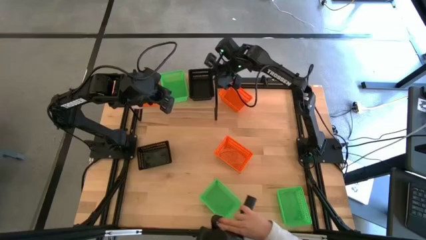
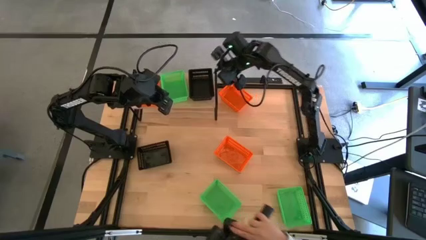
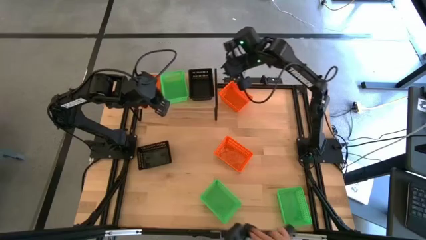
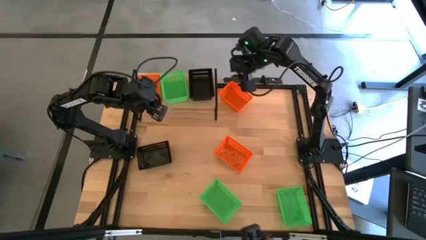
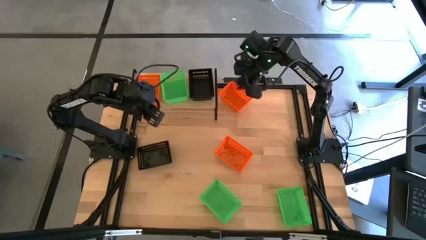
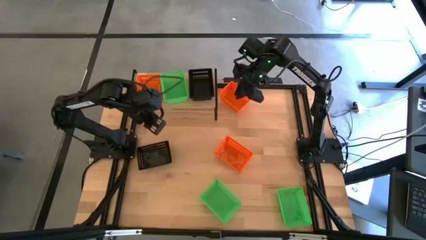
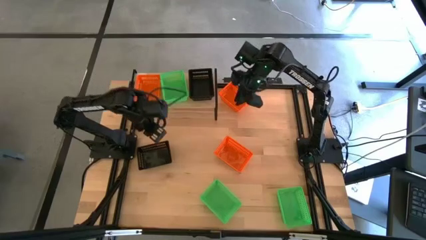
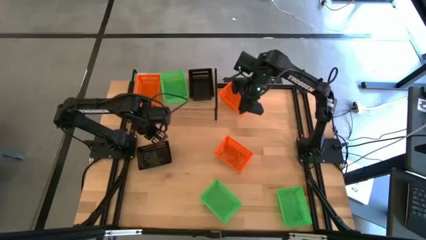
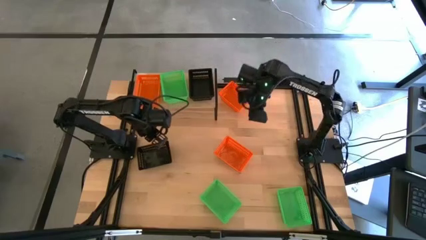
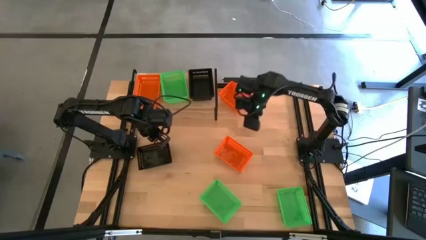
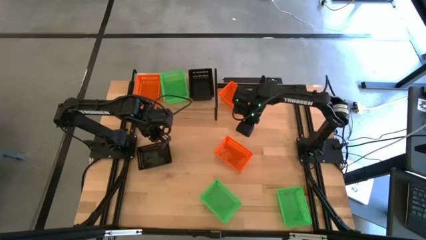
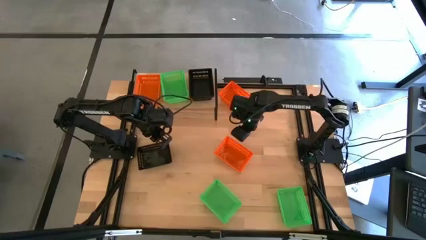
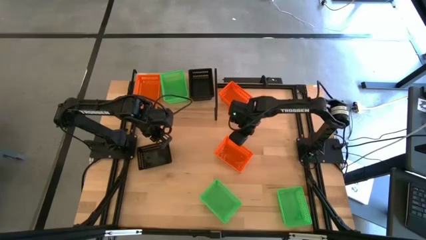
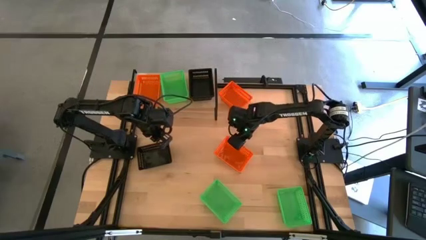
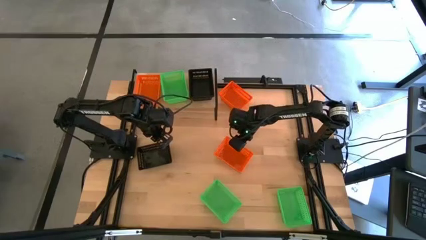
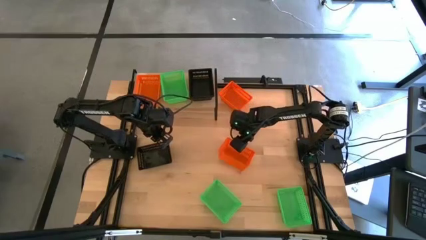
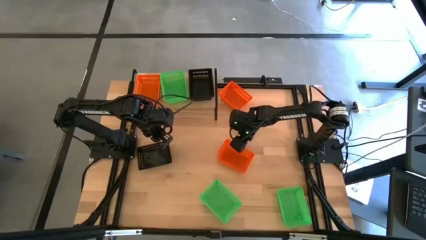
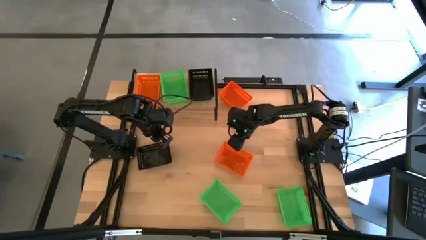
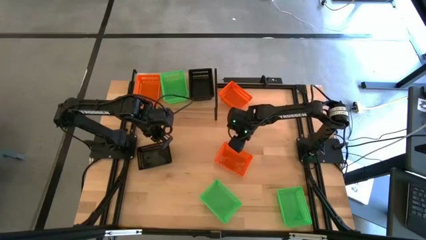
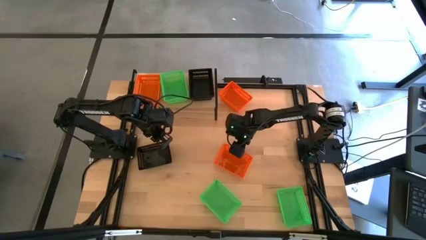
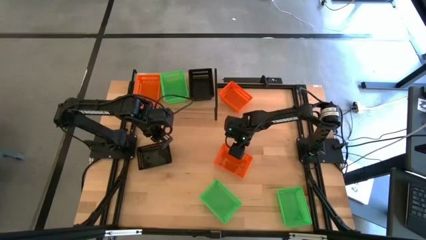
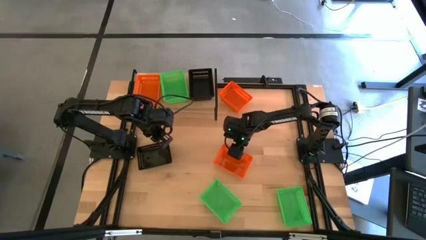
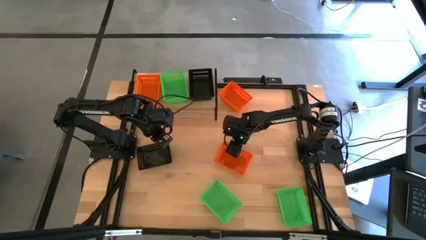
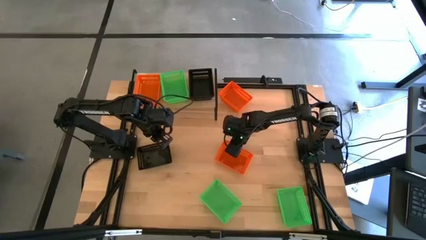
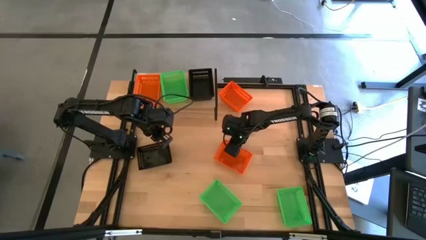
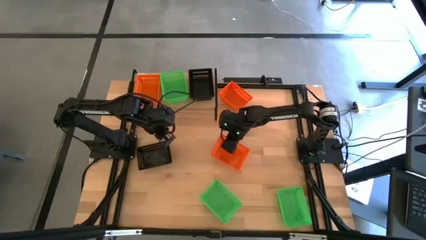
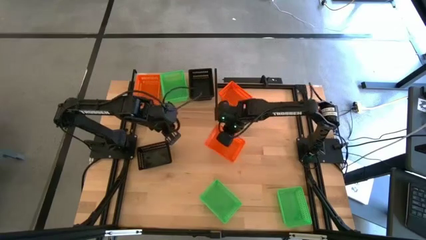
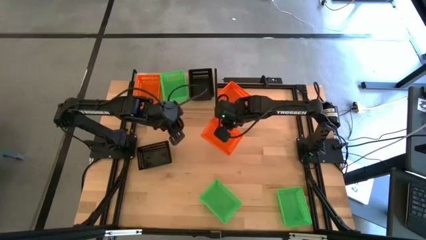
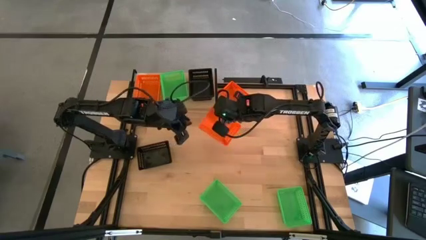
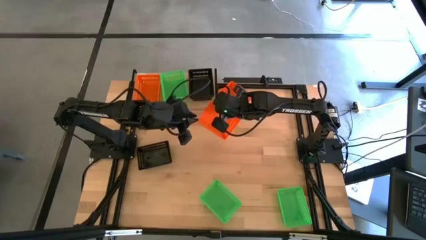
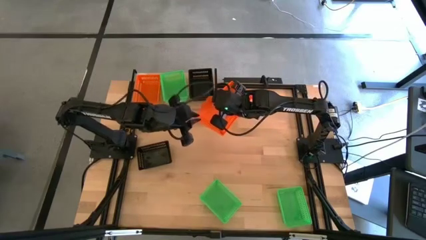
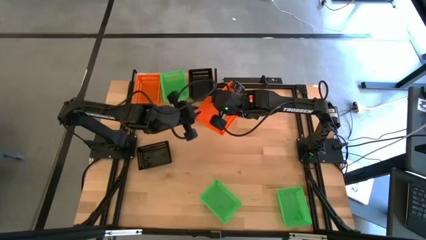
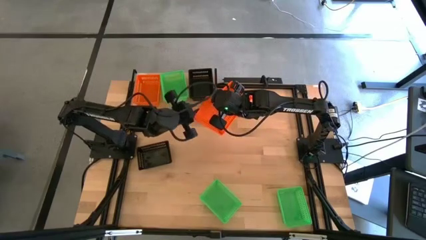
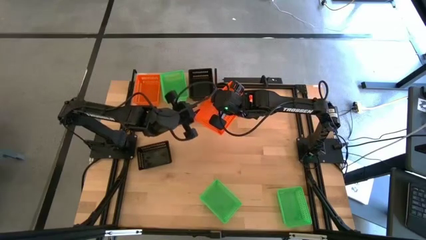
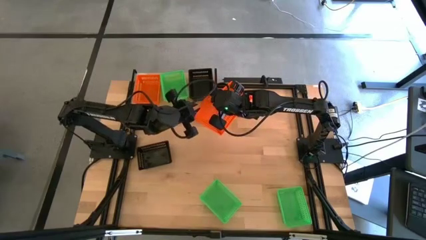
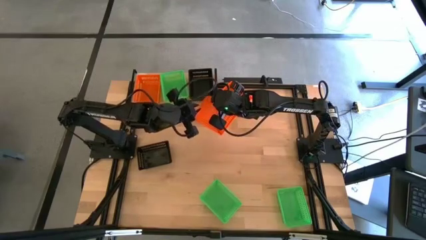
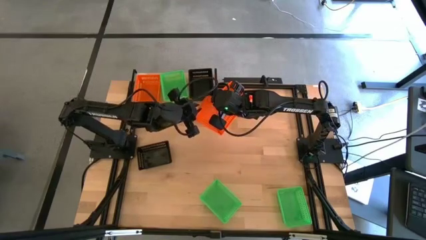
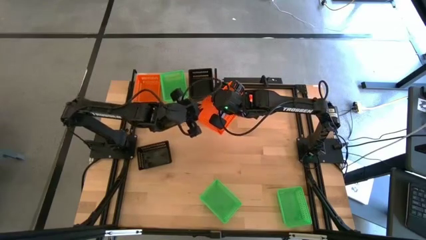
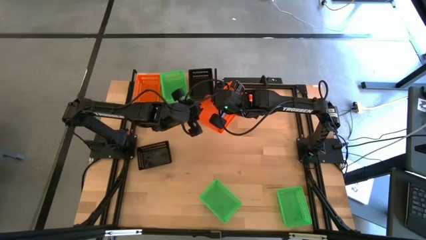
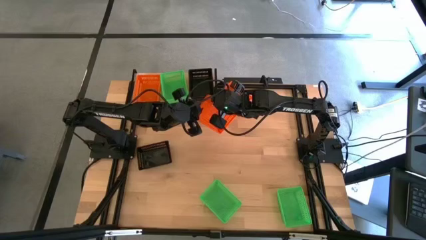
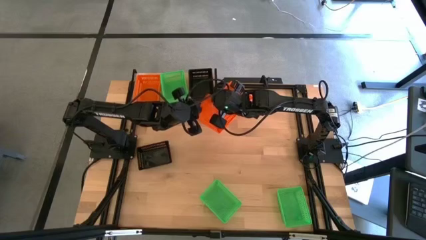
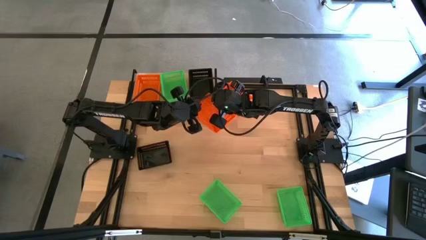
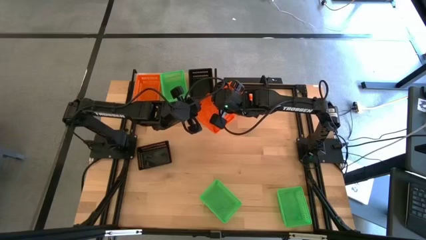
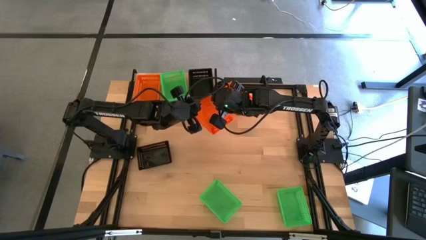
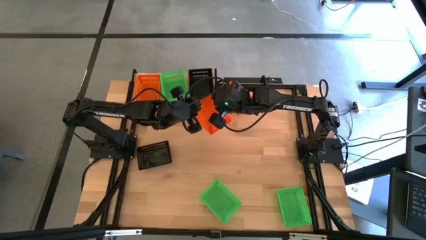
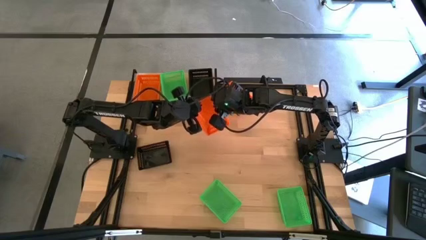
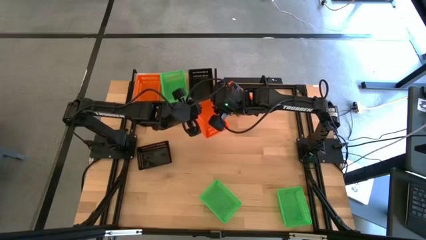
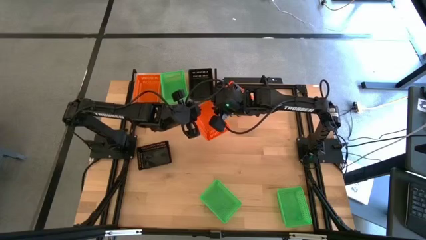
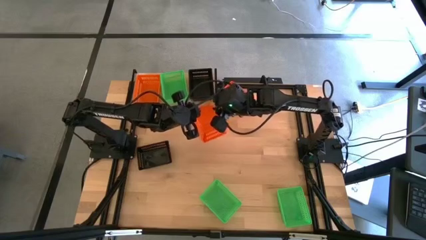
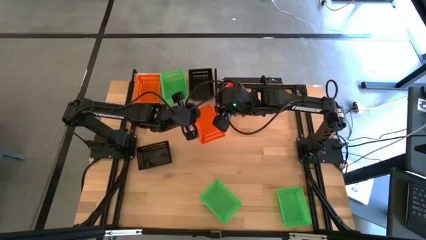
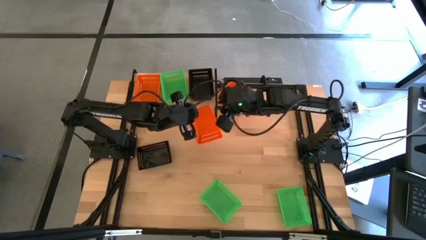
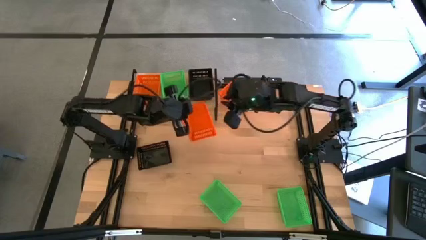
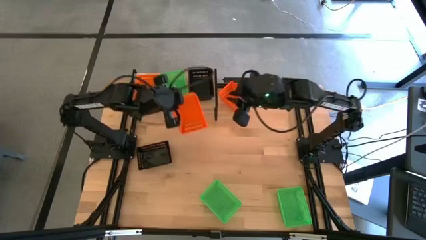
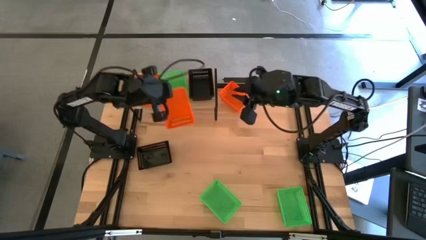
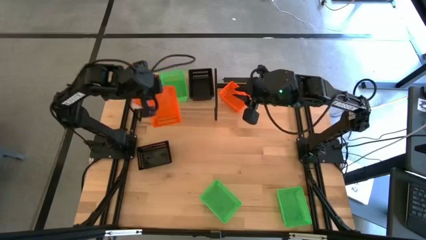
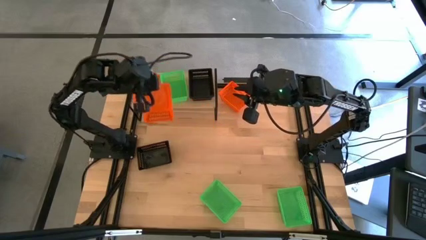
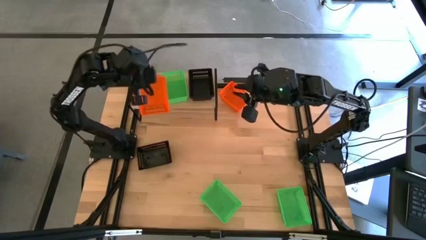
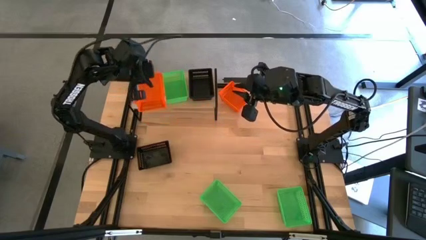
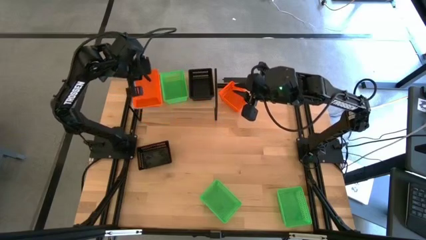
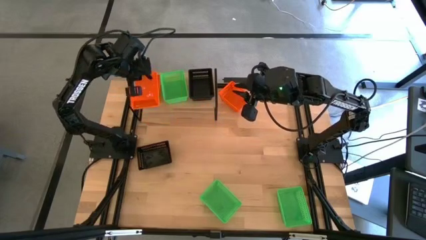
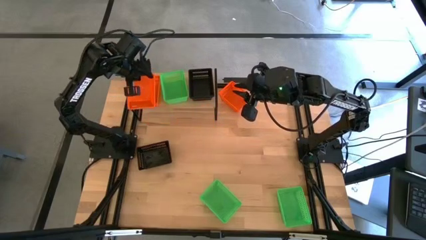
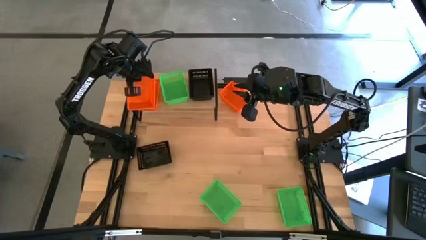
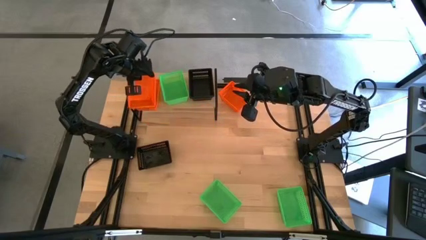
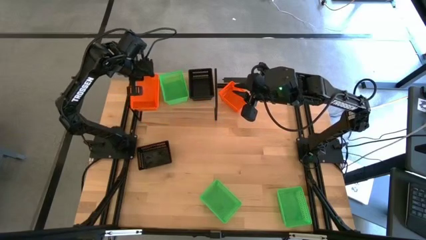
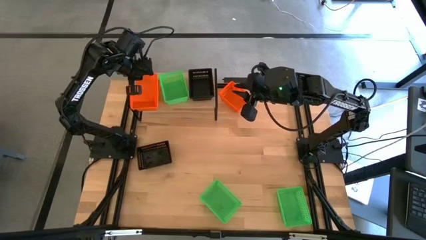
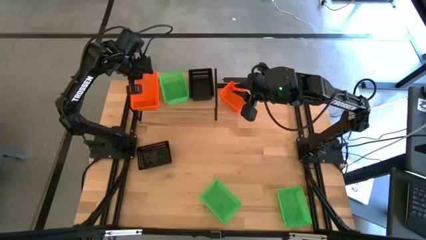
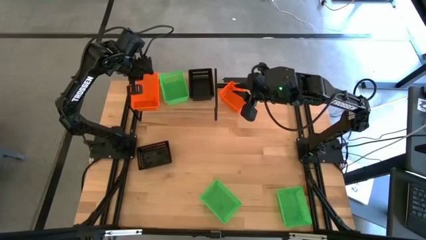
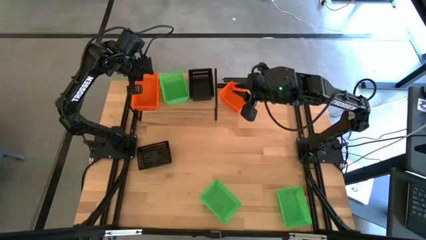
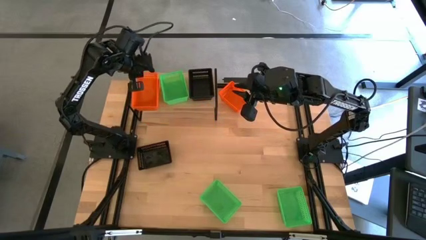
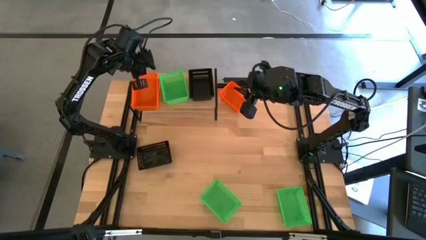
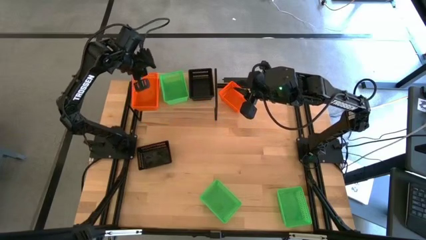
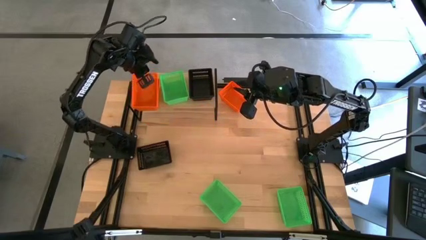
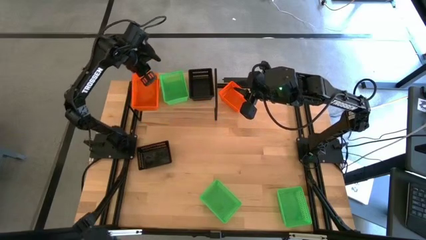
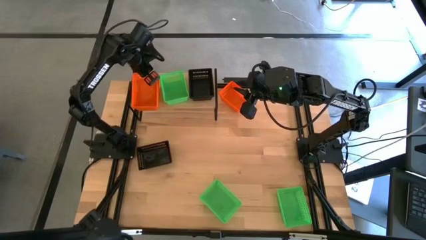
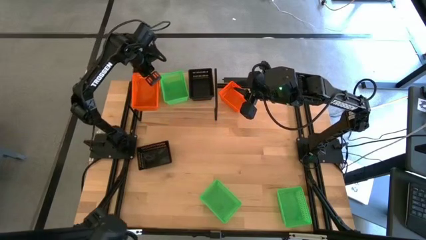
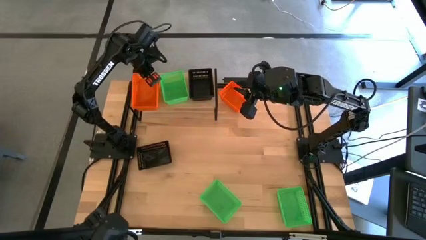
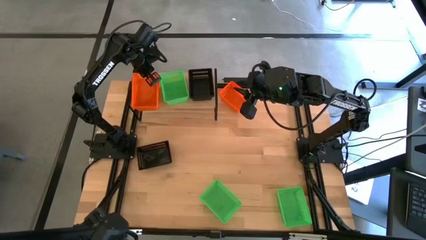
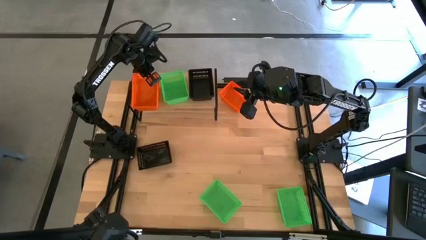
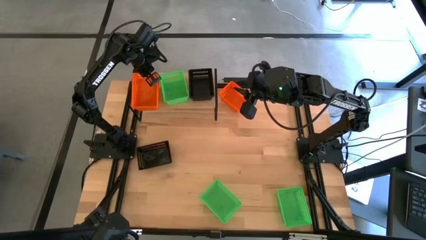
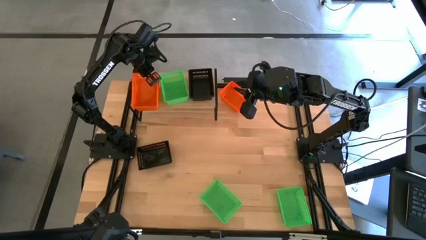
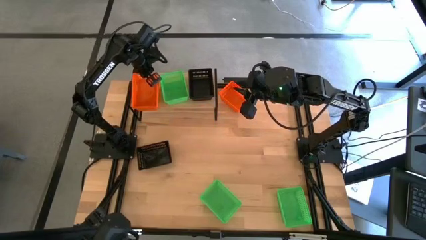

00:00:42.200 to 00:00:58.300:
Task: Stack baskets on shelf by color
Stack the bottom orange bin on the orange bin on the shelf
